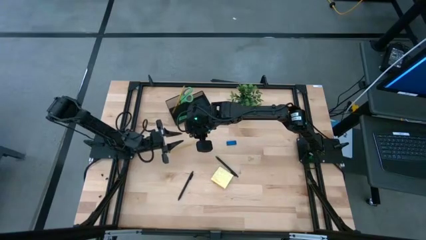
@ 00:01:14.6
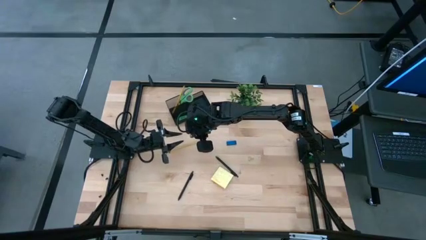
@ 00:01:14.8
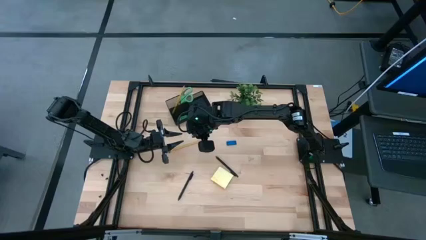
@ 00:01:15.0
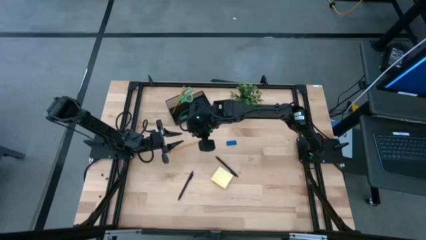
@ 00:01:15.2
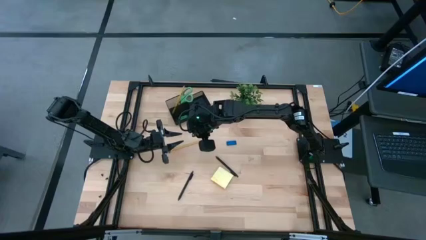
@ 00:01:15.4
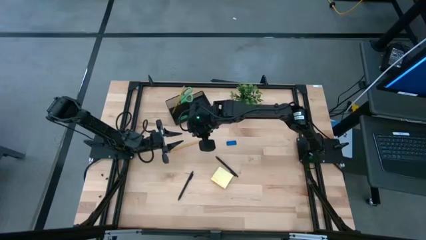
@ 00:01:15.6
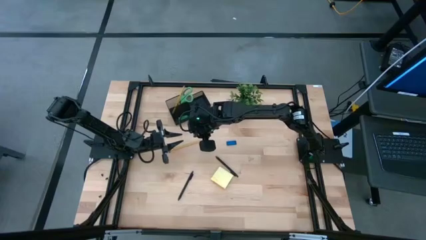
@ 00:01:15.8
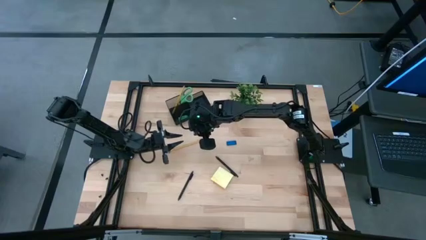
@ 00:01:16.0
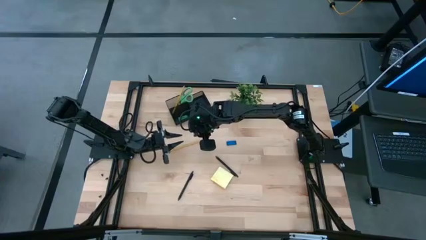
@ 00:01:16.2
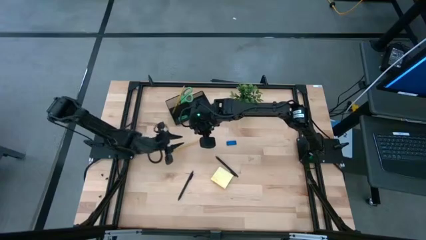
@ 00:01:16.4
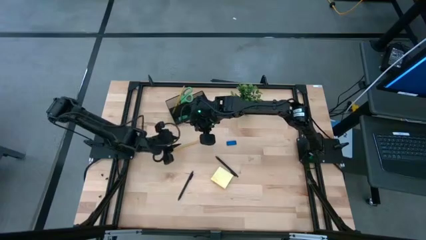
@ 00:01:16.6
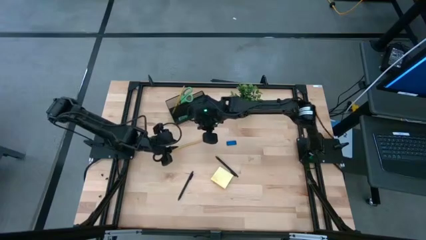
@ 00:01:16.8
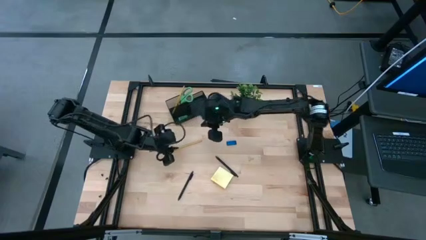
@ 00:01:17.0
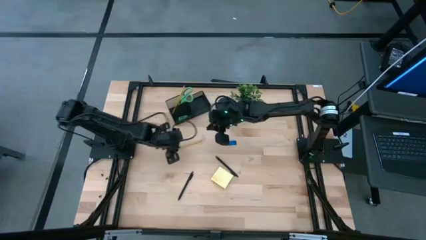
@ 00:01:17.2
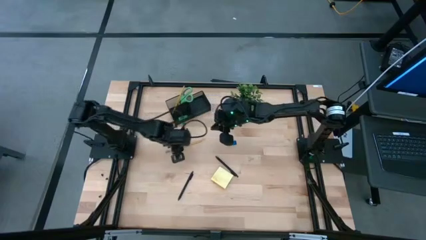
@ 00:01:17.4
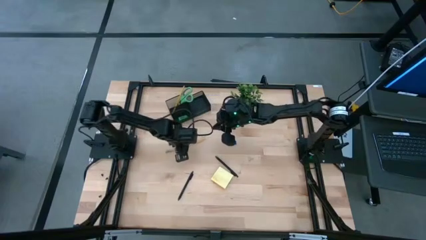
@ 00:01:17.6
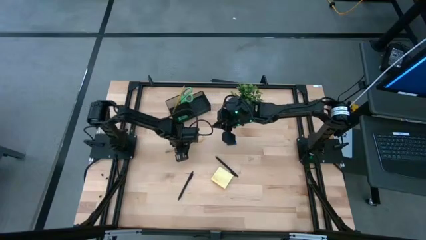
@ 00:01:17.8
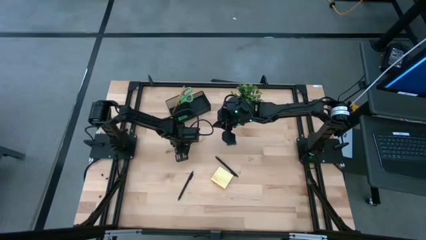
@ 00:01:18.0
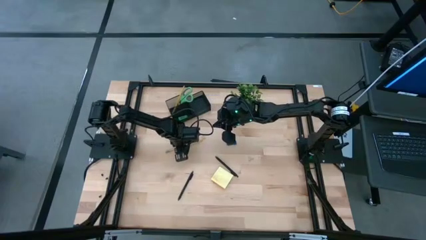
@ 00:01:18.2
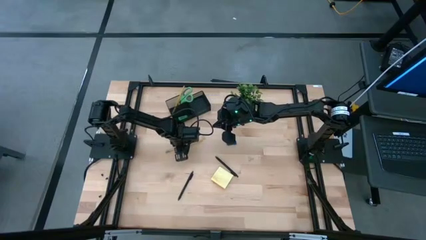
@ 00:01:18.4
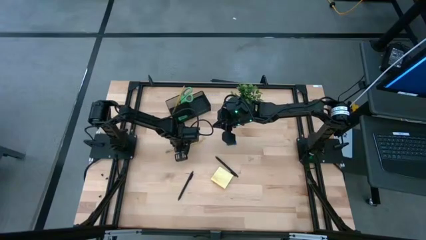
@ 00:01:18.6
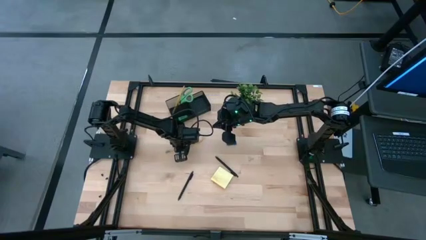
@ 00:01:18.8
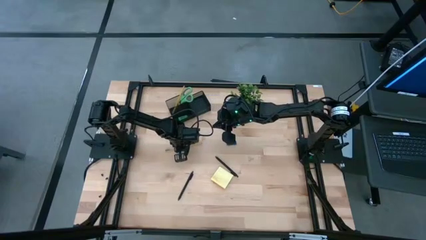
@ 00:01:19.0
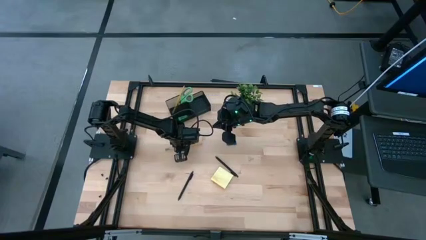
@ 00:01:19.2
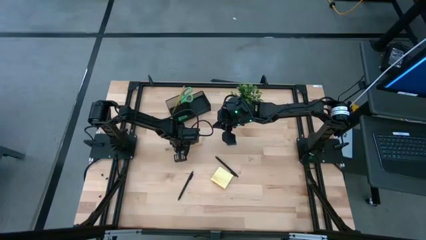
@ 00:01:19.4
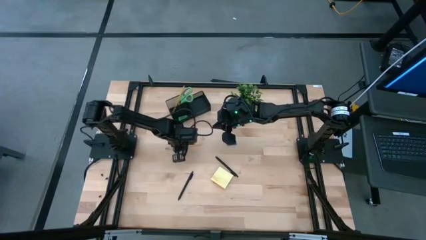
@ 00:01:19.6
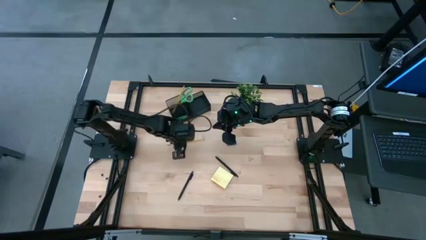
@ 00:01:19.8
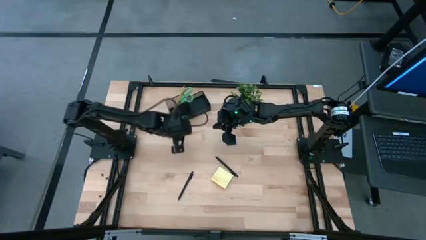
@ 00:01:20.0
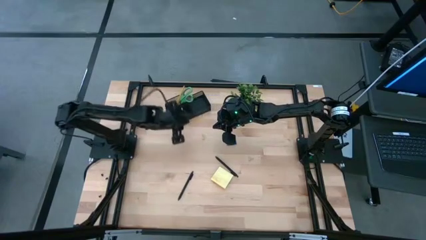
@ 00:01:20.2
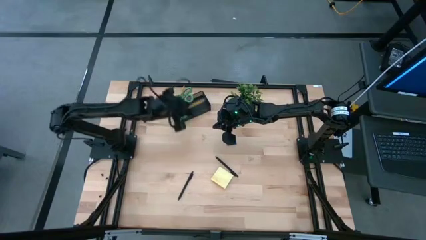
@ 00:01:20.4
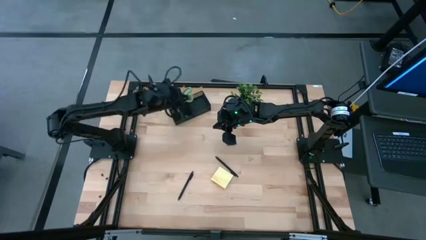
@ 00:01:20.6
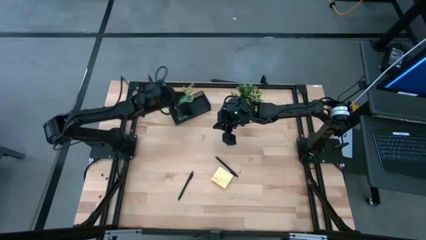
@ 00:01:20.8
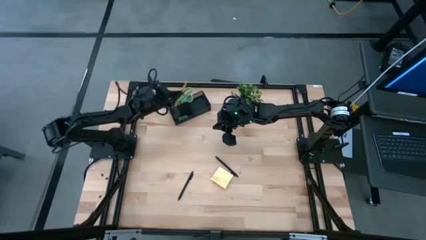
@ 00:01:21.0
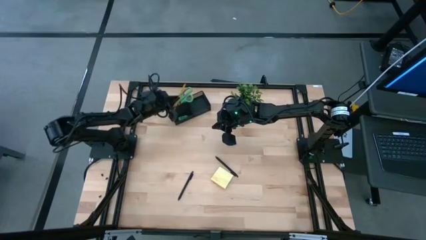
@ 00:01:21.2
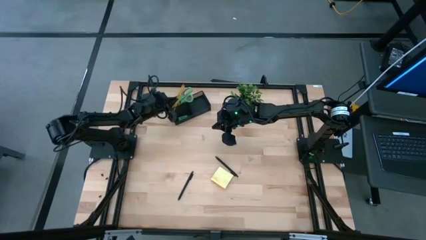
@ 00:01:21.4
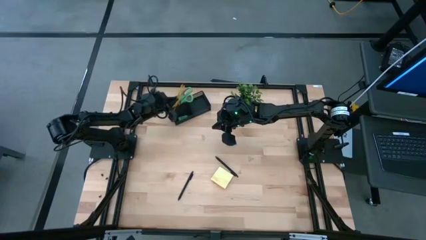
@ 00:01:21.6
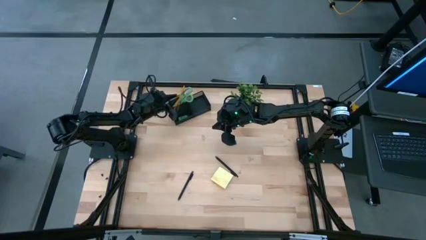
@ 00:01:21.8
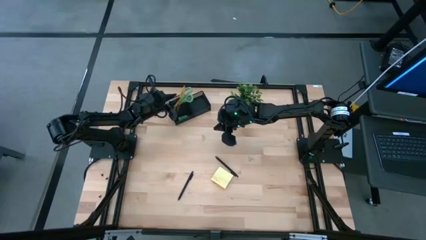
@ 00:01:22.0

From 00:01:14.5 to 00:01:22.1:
Task: Pick and place office supplies into organizer
Put the pencil into the desk organizer

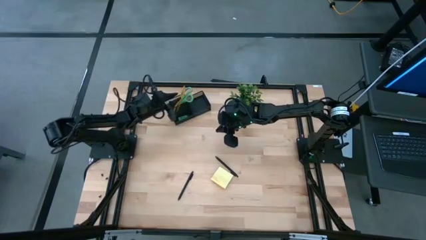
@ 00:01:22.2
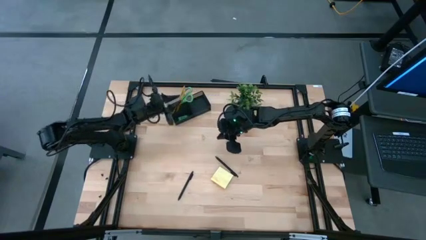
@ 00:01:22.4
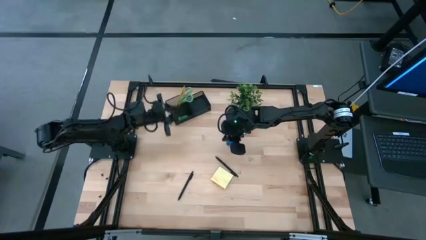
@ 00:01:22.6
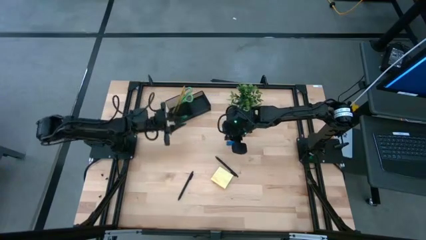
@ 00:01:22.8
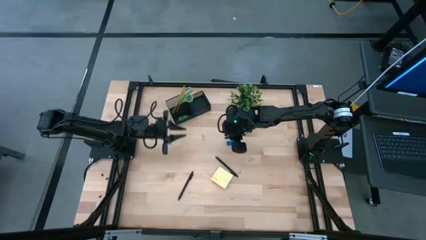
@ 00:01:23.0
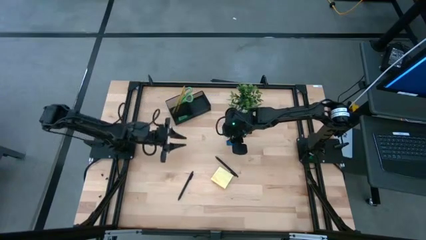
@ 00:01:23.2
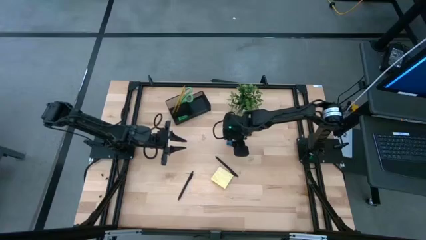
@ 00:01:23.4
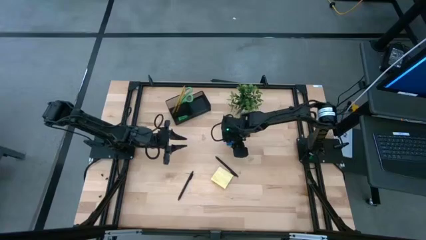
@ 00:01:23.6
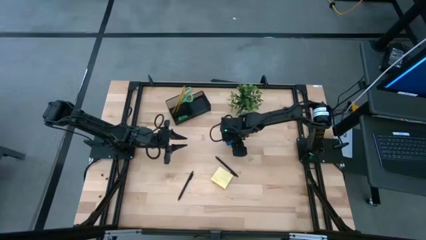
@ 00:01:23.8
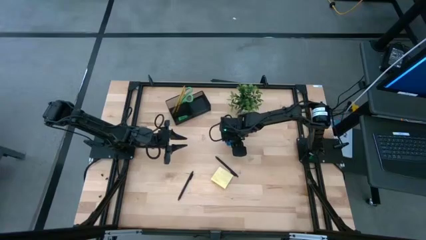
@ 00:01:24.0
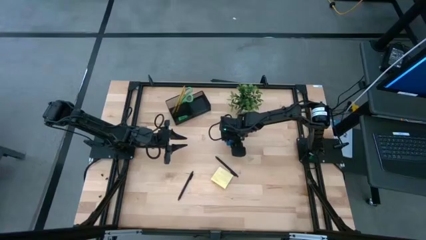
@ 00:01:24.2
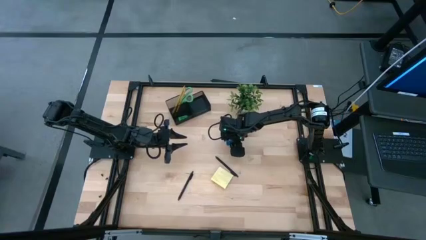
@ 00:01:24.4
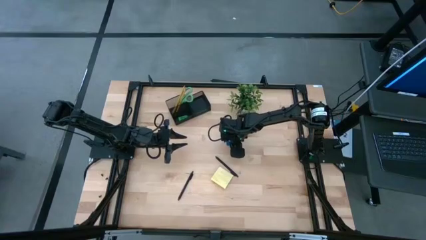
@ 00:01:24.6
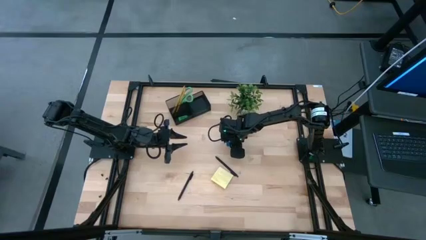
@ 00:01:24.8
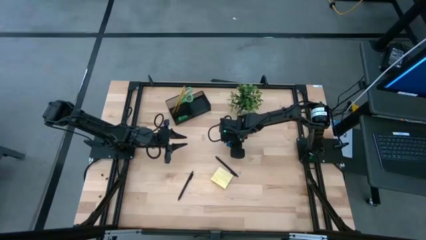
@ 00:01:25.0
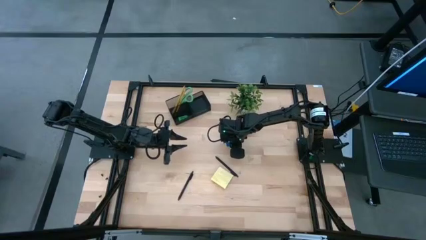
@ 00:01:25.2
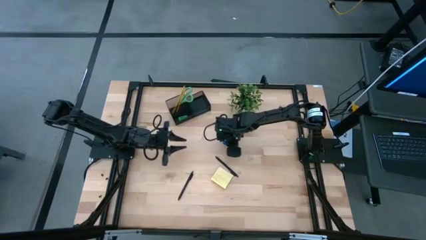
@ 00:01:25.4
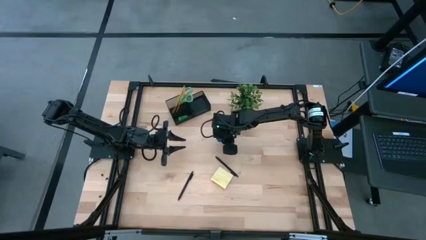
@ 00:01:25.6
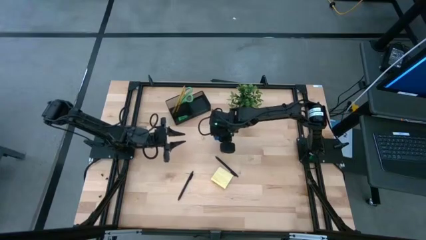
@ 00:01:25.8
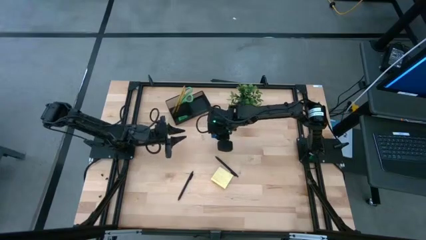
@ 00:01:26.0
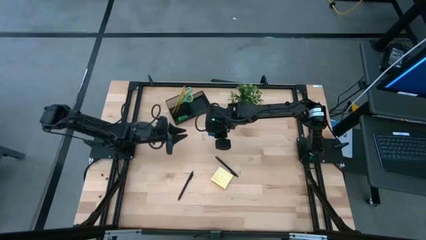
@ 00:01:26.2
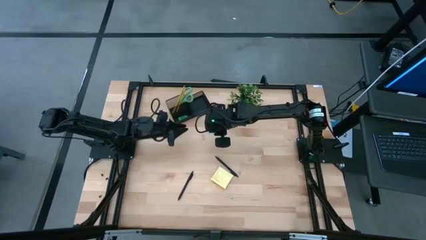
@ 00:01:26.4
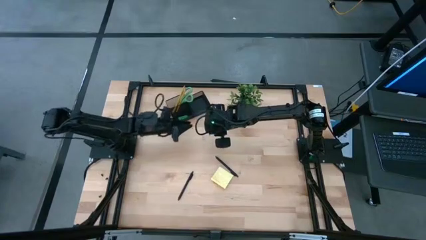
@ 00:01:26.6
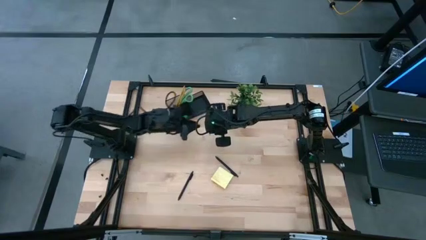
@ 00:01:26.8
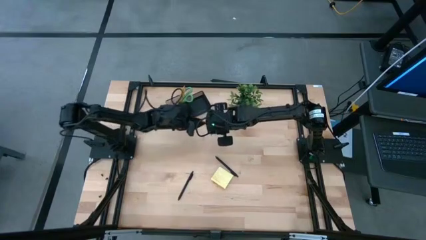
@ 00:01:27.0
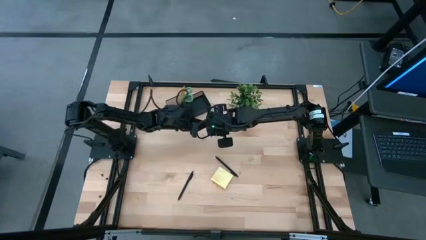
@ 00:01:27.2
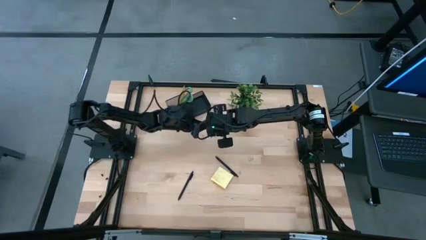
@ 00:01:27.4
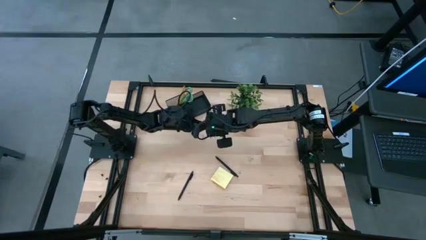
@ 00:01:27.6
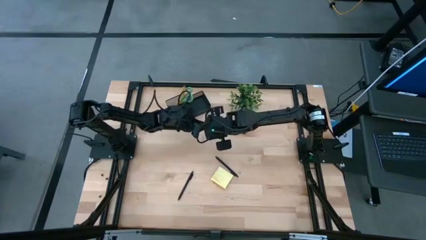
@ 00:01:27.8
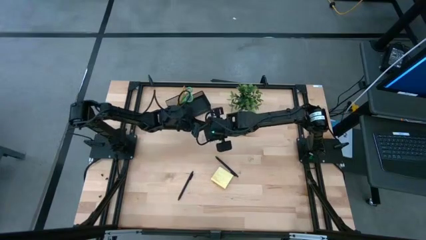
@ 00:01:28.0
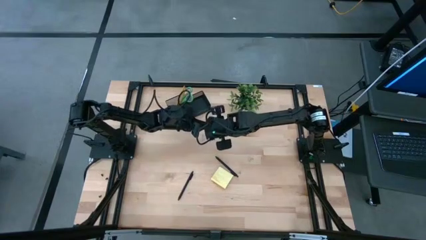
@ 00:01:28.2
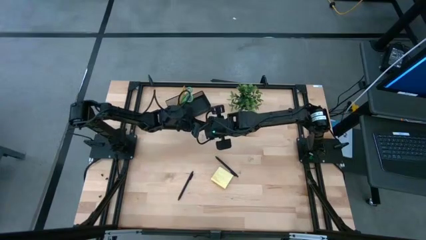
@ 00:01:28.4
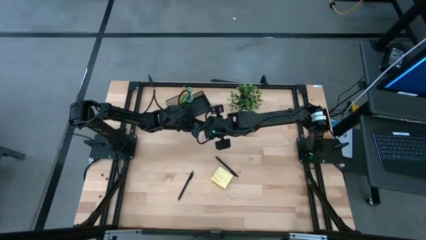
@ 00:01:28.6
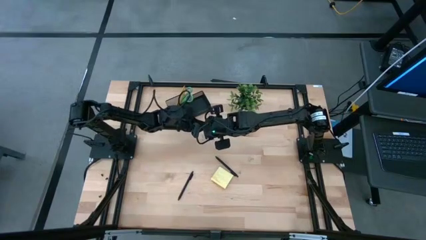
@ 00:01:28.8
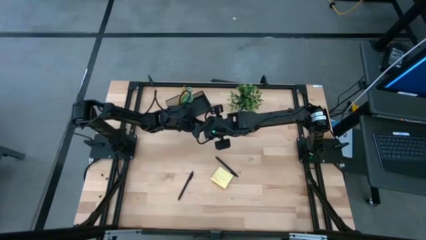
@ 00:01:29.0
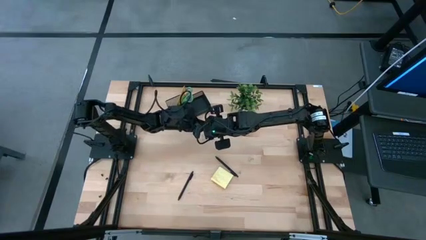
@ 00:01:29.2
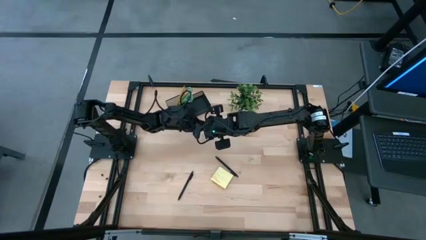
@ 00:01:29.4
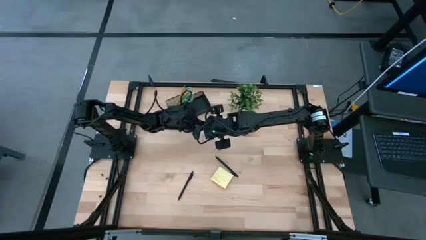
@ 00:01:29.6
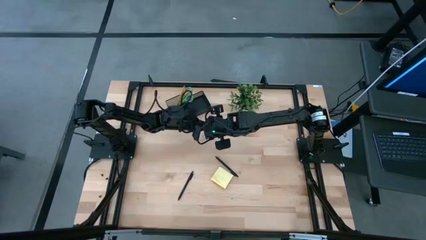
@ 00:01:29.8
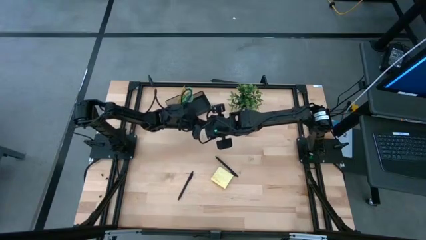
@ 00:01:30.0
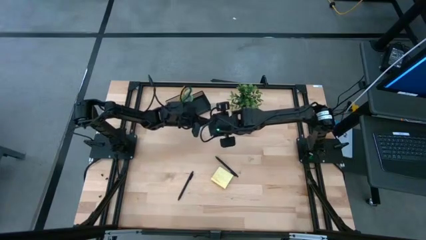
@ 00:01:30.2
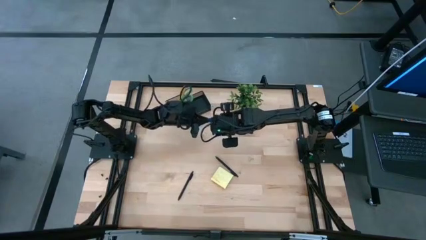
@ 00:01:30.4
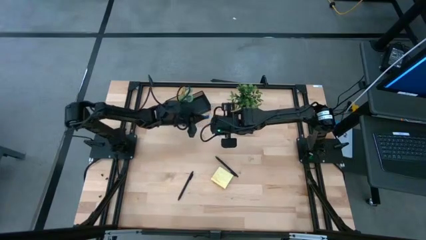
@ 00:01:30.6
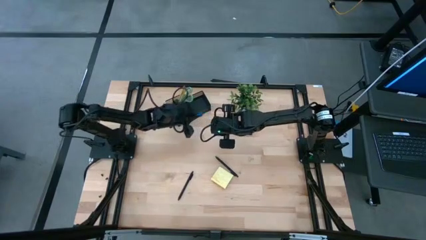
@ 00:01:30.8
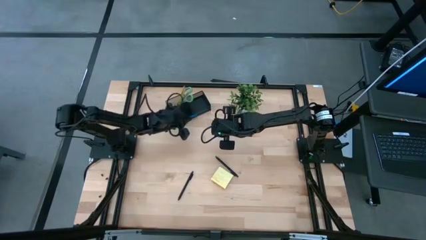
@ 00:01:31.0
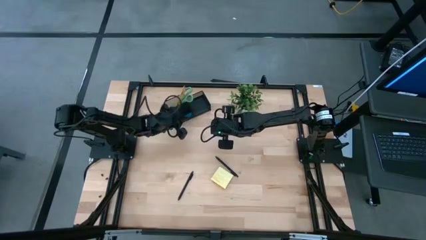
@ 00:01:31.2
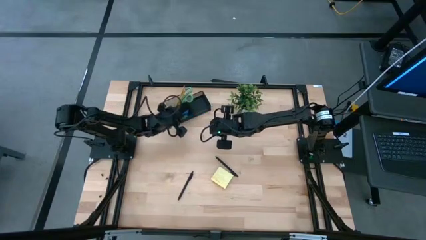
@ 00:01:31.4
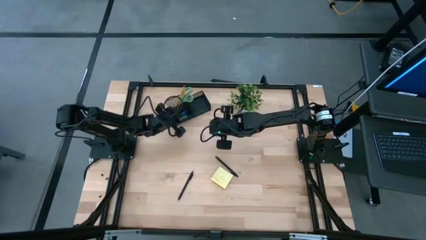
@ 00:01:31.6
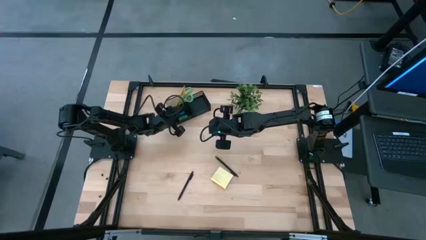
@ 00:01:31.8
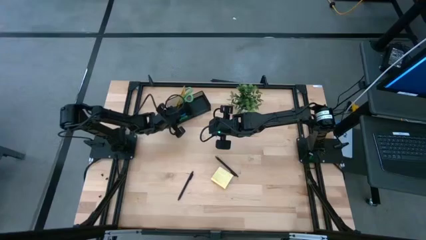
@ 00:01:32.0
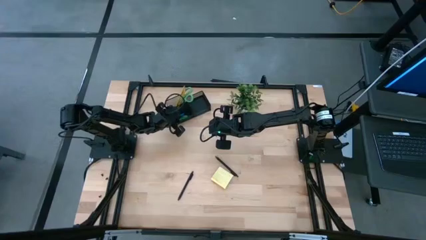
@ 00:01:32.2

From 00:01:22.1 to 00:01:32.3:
Put the blue eraser into the desk organizer
